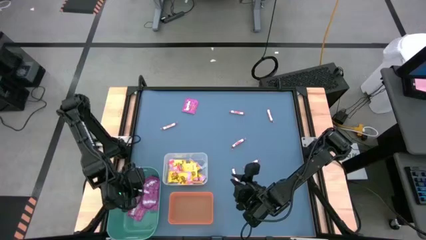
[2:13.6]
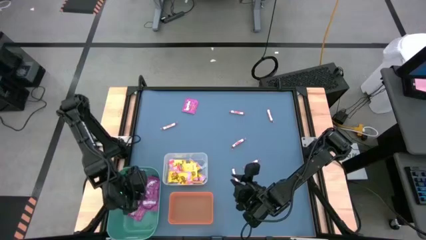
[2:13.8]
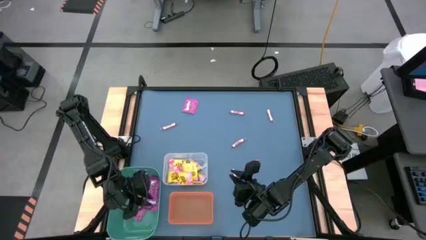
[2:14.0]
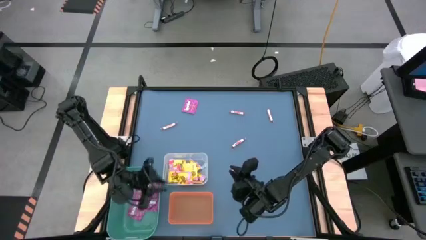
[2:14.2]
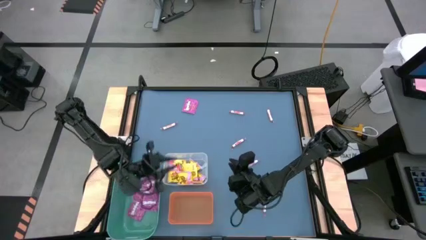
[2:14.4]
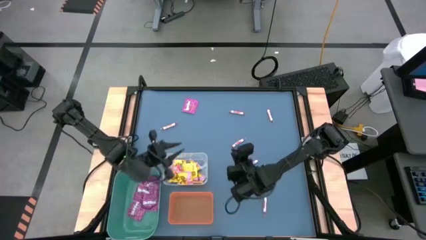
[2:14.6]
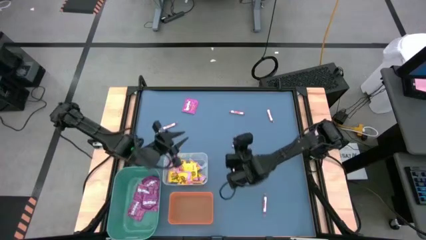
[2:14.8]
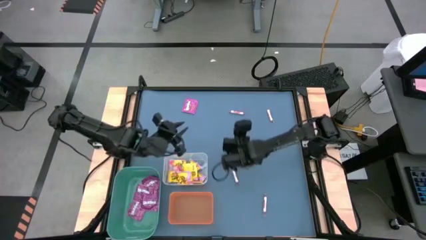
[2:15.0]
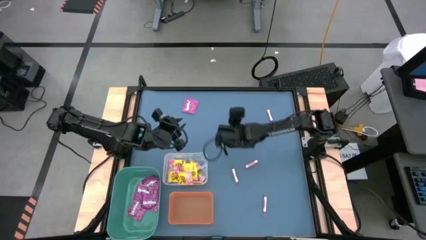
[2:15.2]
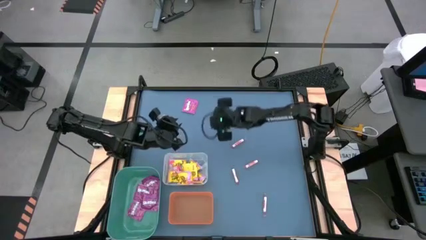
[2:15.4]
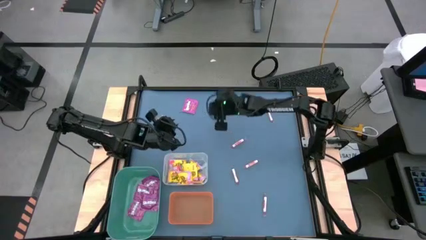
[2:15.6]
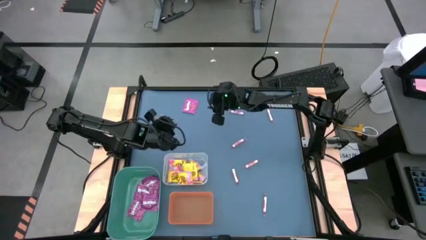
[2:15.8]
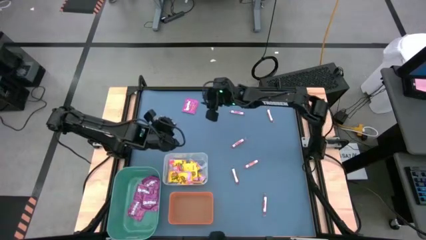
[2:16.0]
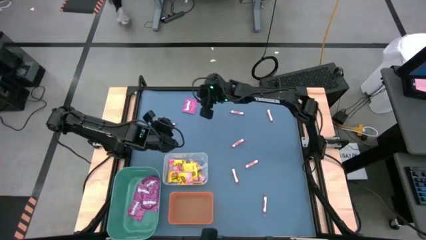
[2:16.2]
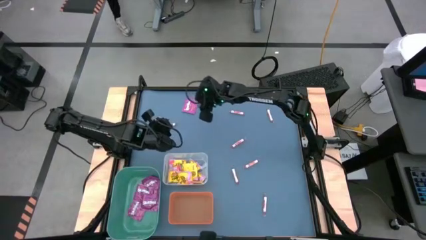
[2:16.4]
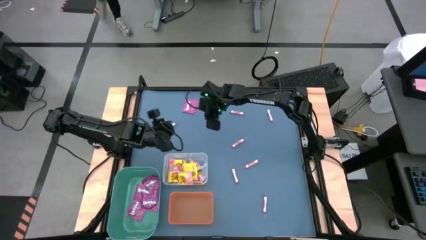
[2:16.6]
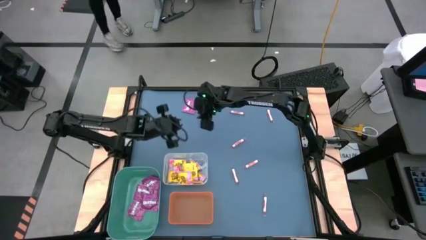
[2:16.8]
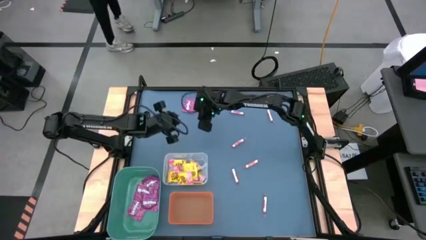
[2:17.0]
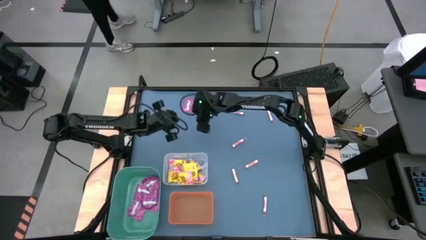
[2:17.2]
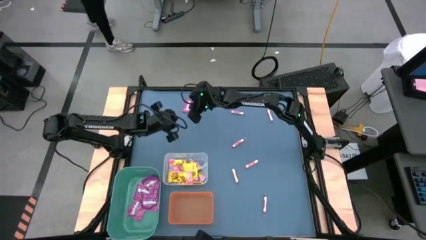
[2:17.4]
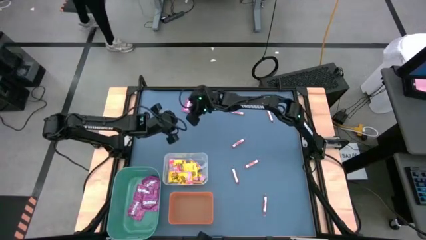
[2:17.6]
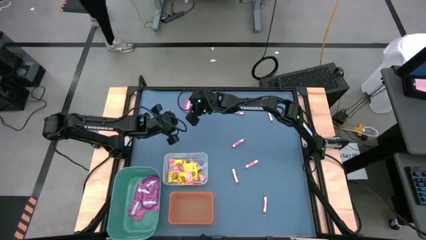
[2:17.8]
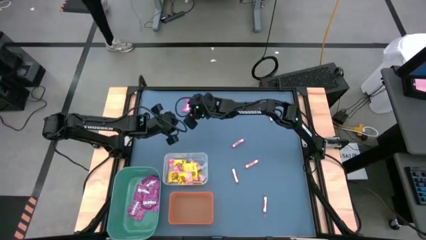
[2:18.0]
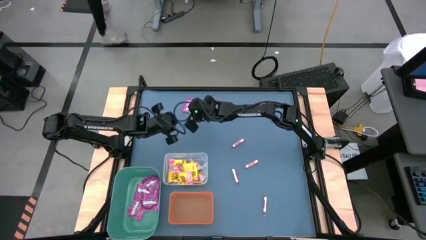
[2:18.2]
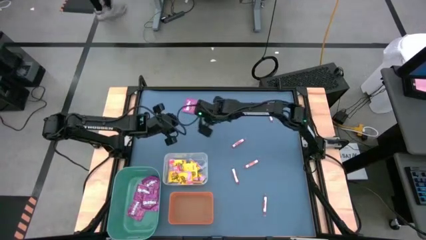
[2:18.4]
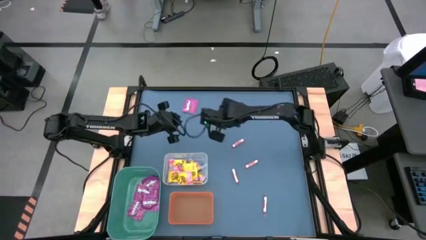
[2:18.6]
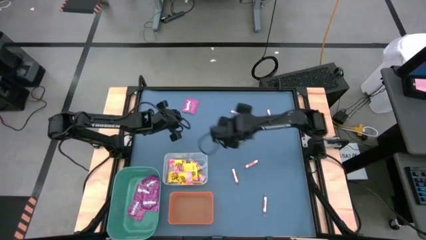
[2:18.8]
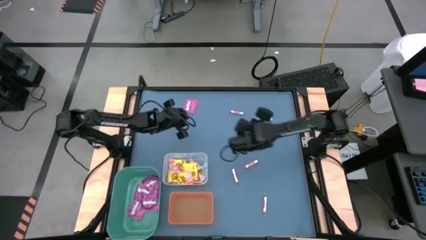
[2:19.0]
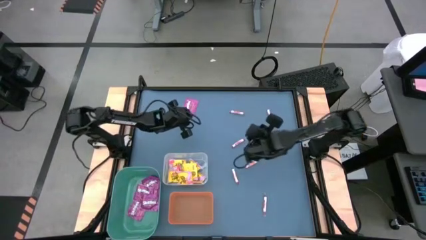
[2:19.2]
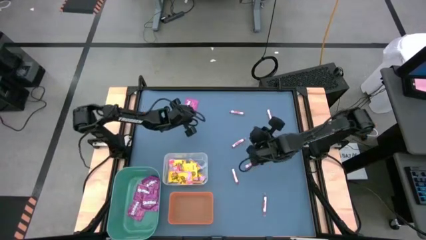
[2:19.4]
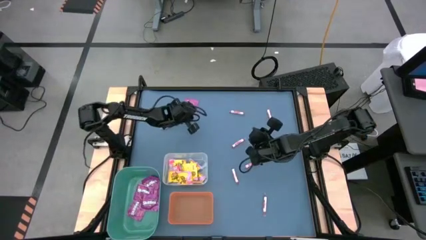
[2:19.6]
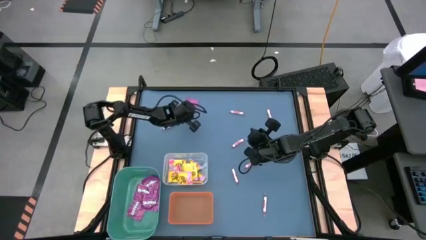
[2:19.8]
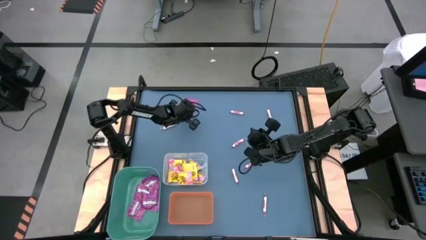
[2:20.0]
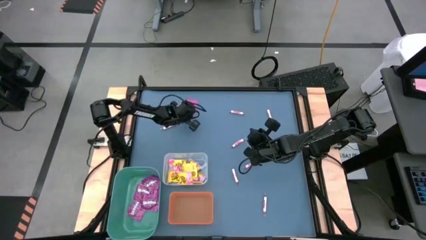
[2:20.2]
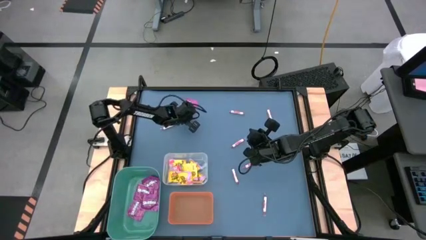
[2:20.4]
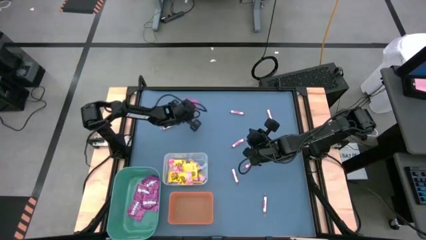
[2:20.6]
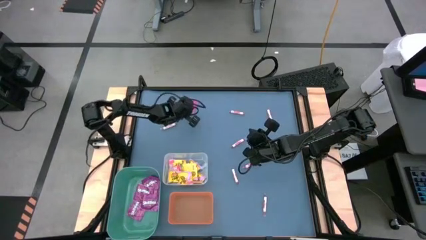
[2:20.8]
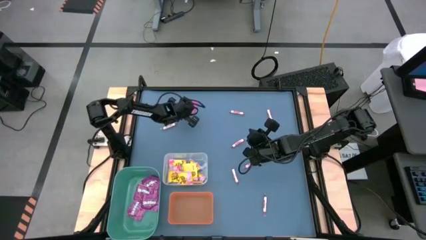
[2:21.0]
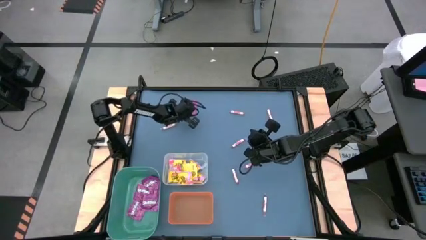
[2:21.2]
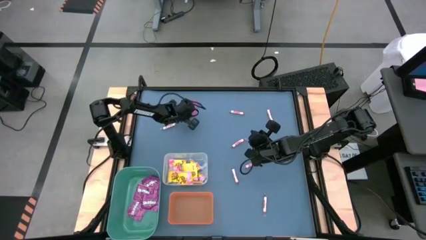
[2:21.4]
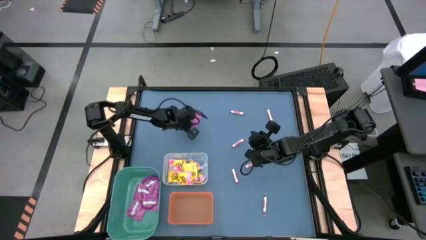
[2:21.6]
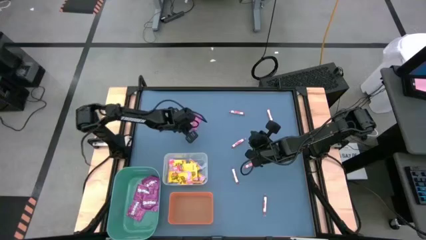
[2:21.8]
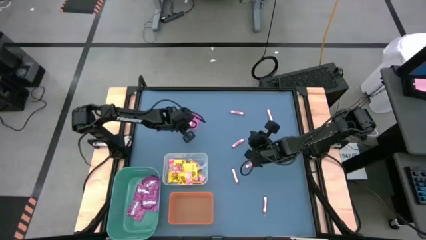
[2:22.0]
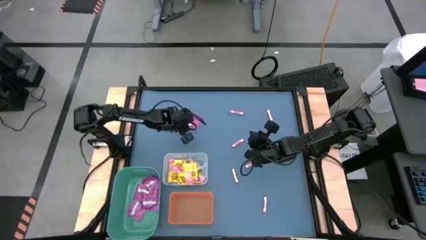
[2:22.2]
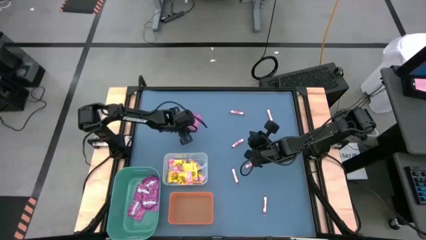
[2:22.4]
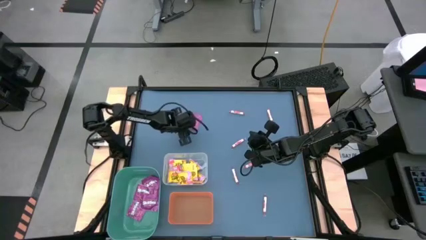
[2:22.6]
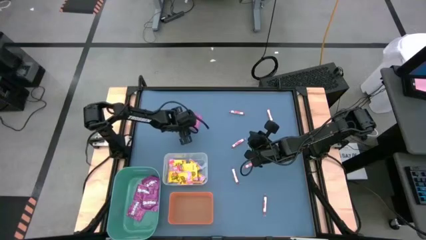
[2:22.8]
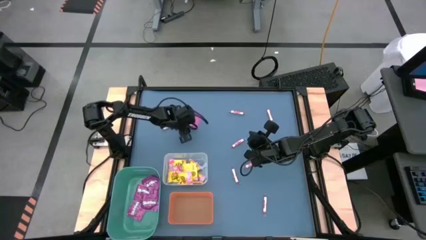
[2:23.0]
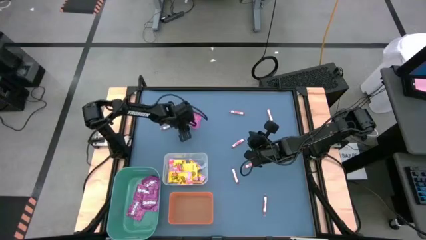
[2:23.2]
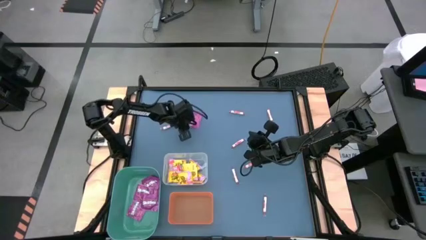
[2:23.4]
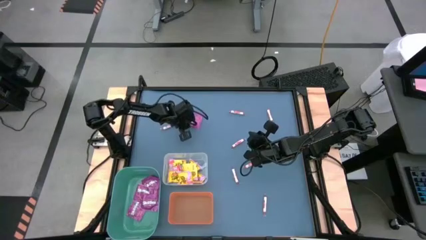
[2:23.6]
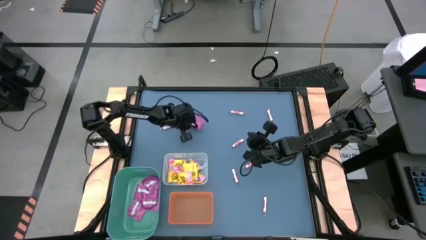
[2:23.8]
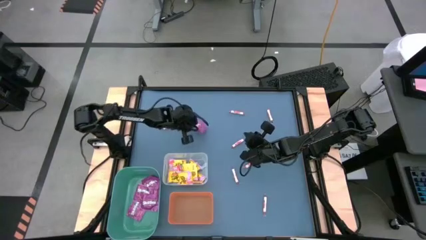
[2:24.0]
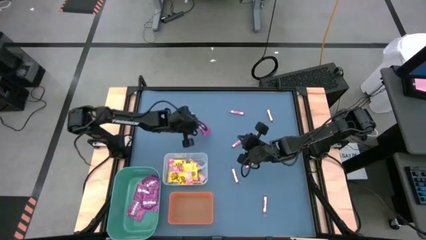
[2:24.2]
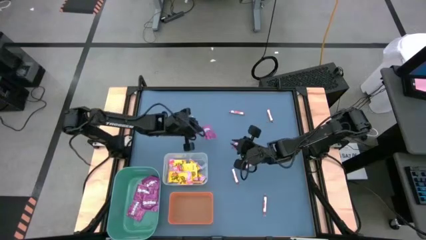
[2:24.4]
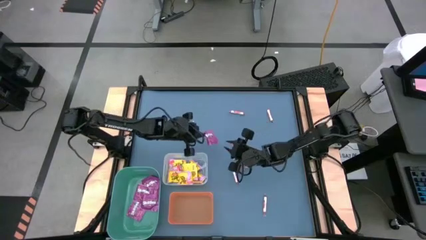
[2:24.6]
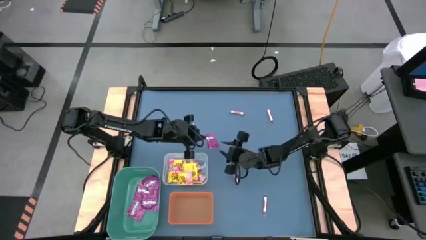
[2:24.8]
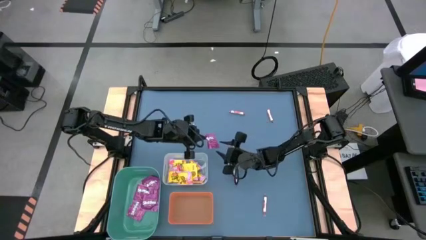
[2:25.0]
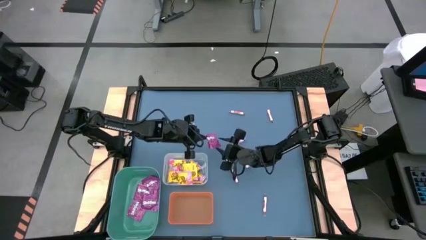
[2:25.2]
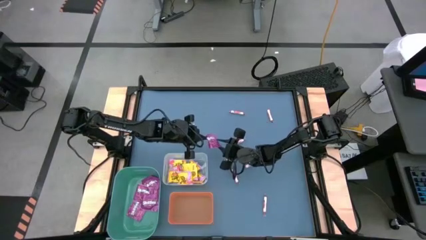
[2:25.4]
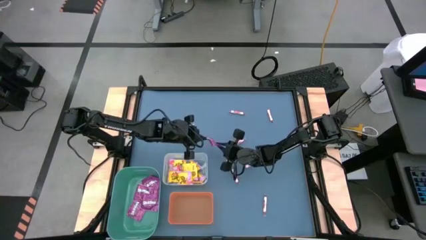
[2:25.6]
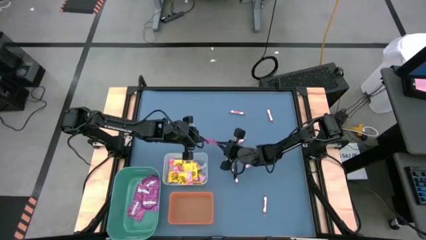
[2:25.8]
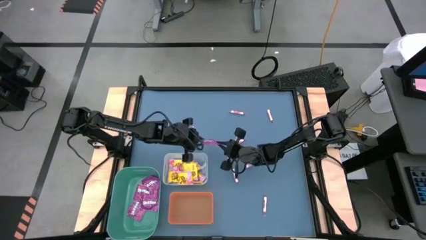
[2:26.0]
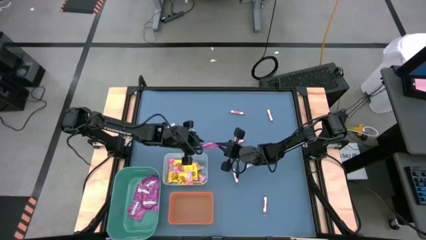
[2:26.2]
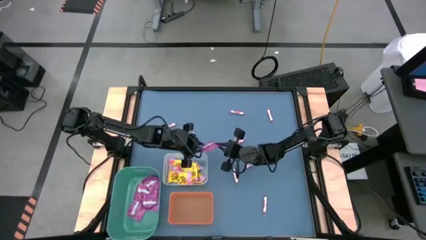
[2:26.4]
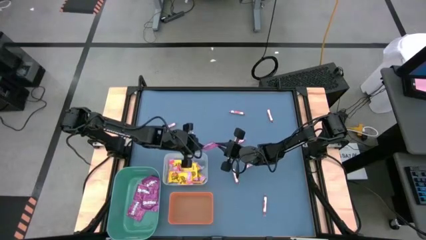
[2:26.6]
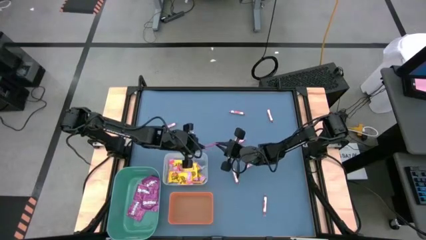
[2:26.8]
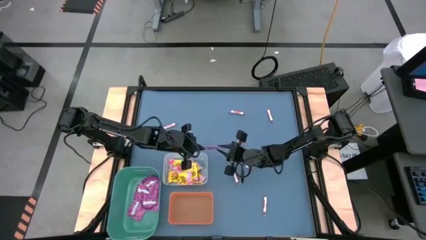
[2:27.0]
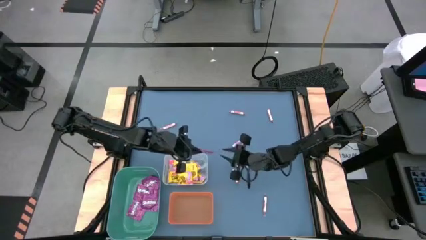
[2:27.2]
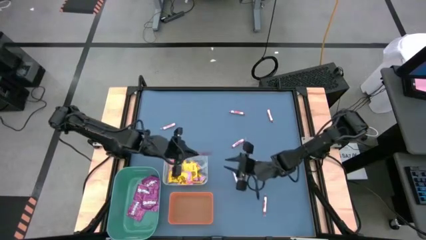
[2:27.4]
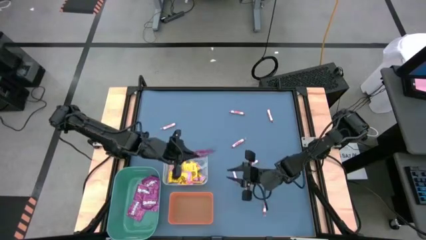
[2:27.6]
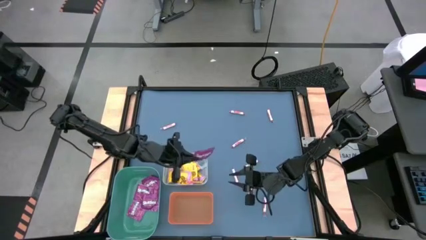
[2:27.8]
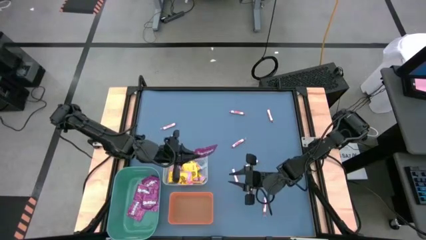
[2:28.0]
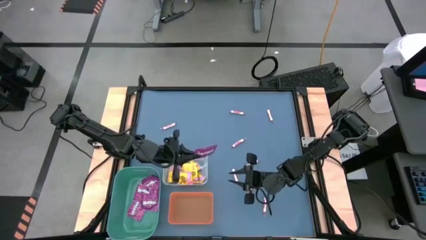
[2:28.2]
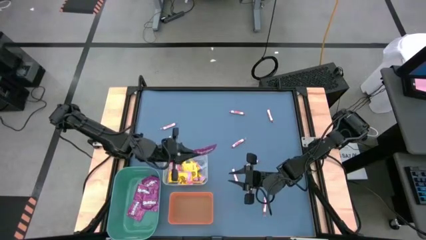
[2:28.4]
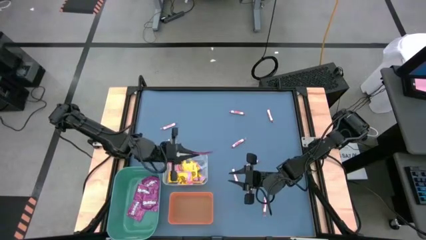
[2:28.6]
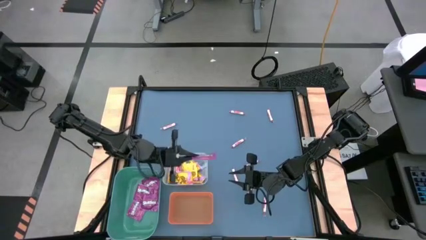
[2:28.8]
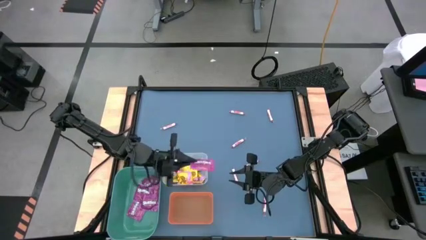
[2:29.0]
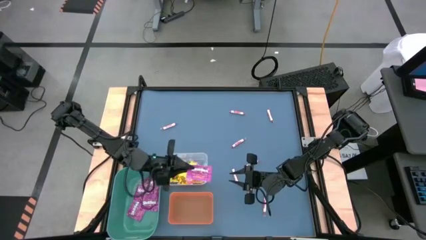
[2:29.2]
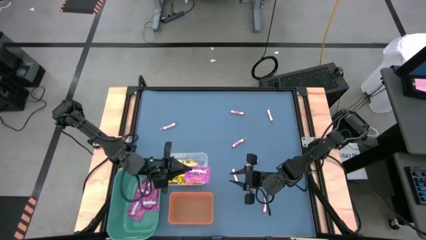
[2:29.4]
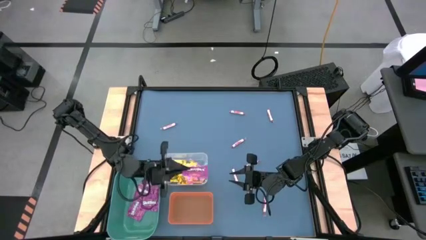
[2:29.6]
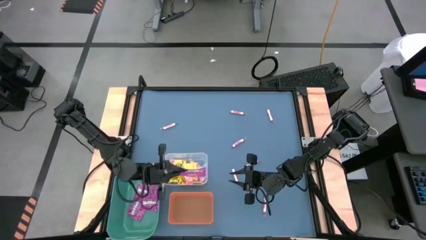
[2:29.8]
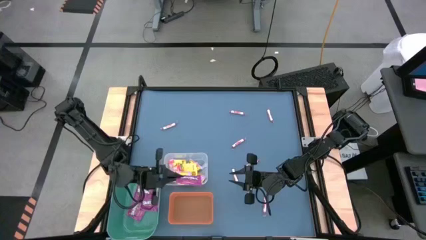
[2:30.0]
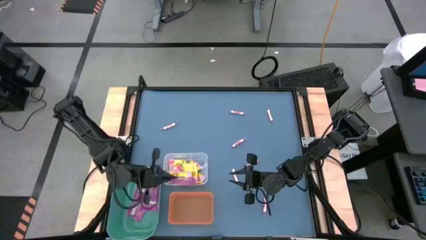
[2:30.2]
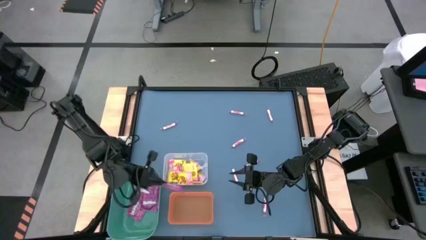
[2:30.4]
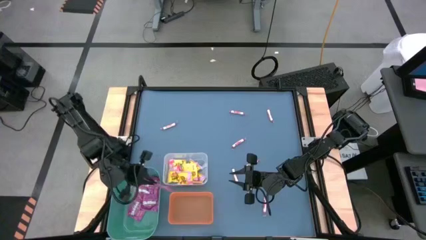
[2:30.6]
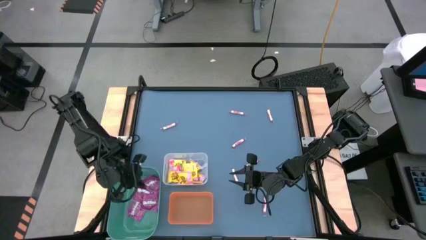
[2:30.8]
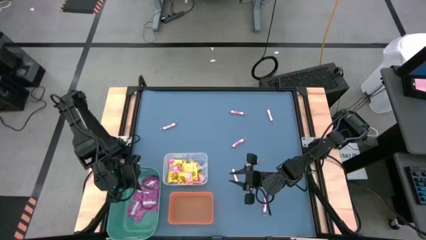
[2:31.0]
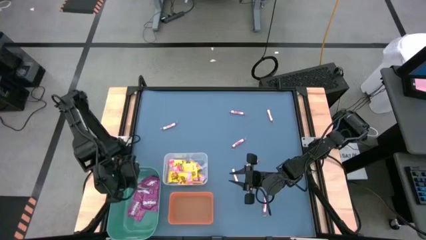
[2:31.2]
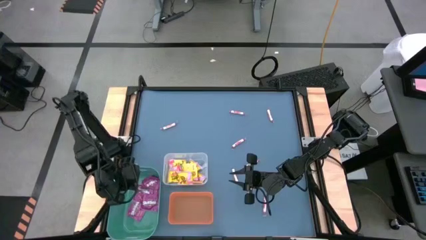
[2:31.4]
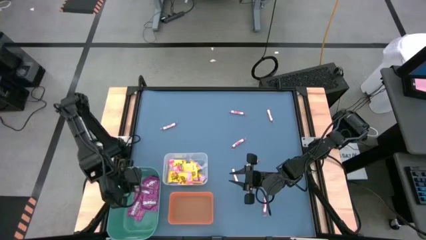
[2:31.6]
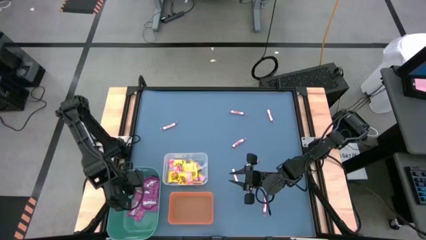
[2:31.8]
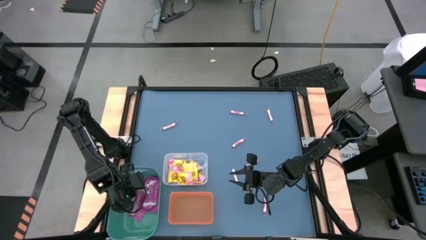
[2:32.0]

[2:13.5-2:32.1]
Task: Sort candy
Put the purple candy into the green bin
